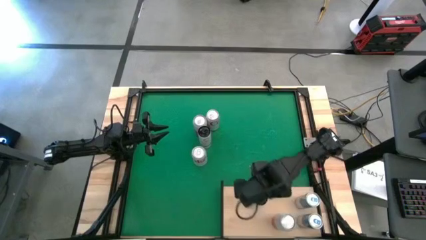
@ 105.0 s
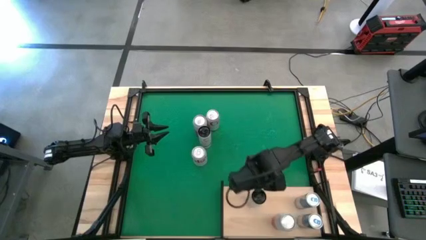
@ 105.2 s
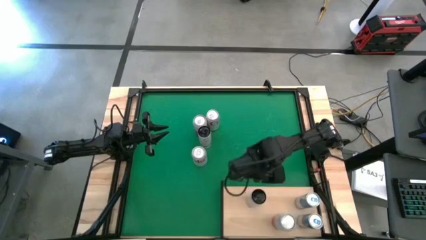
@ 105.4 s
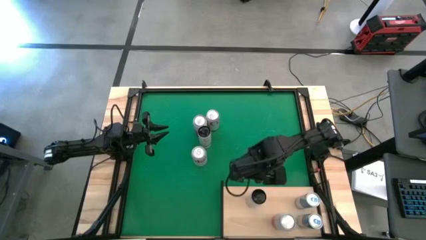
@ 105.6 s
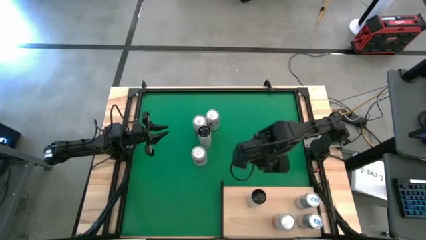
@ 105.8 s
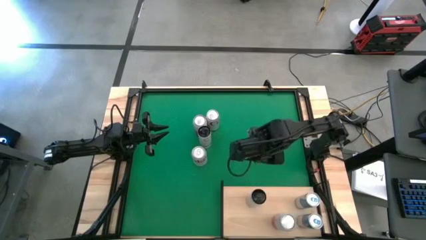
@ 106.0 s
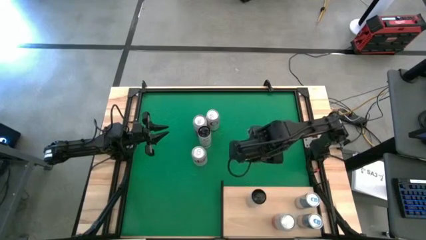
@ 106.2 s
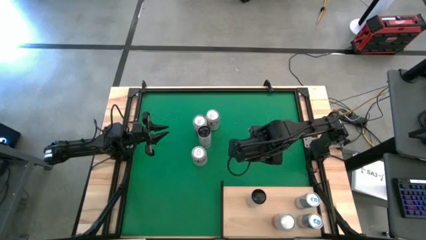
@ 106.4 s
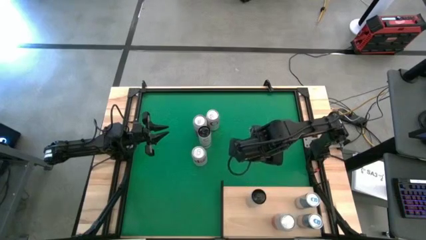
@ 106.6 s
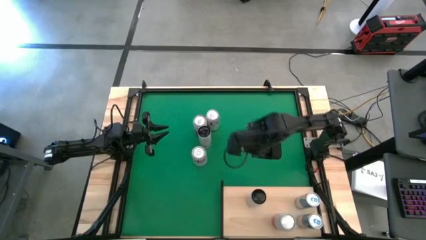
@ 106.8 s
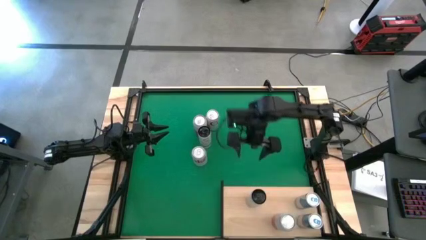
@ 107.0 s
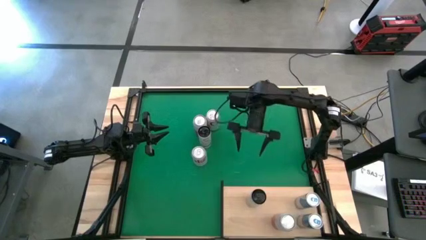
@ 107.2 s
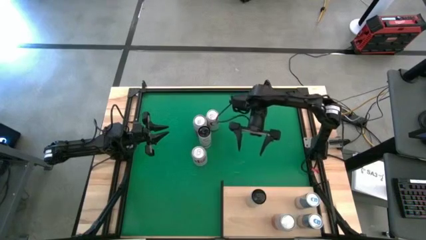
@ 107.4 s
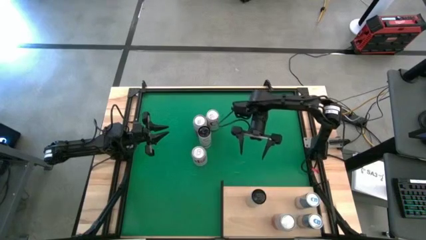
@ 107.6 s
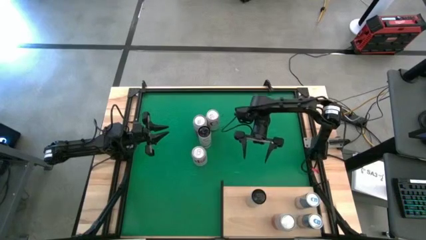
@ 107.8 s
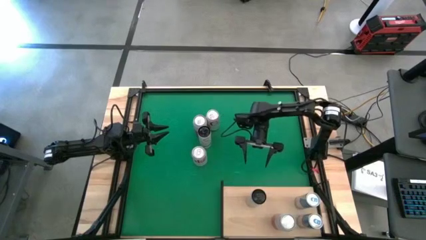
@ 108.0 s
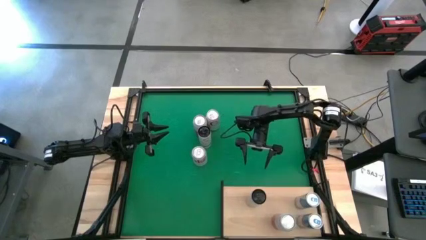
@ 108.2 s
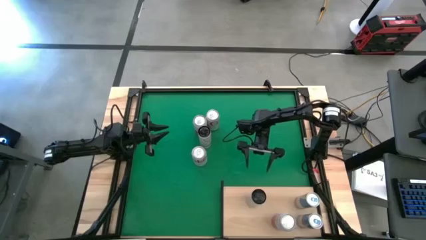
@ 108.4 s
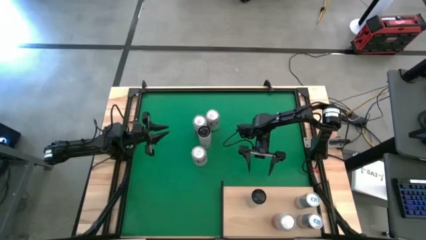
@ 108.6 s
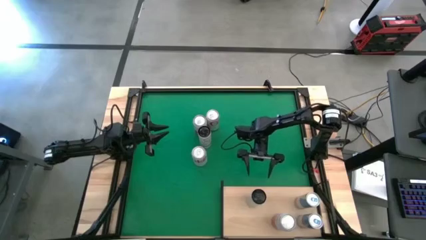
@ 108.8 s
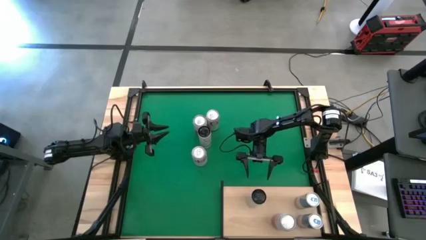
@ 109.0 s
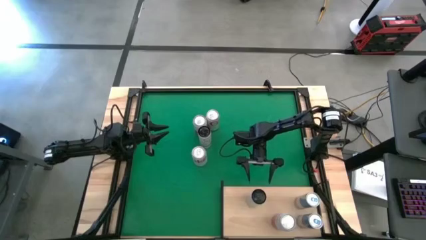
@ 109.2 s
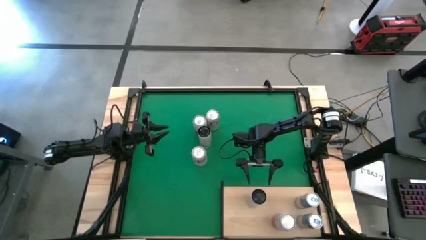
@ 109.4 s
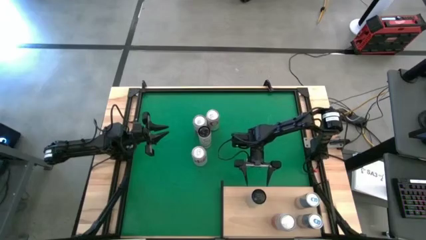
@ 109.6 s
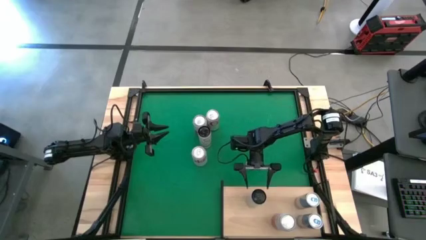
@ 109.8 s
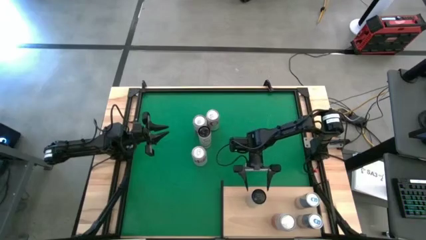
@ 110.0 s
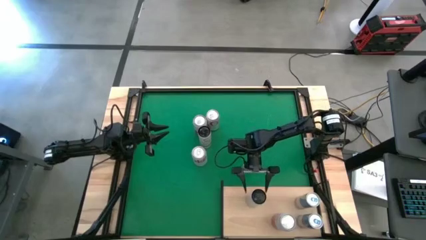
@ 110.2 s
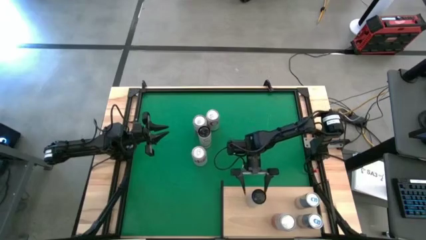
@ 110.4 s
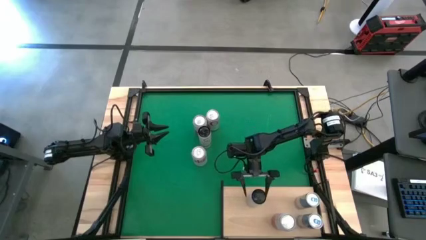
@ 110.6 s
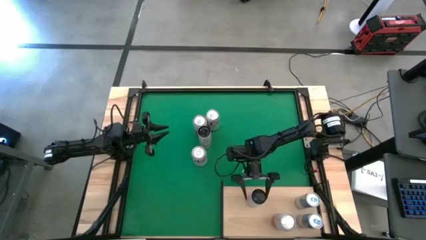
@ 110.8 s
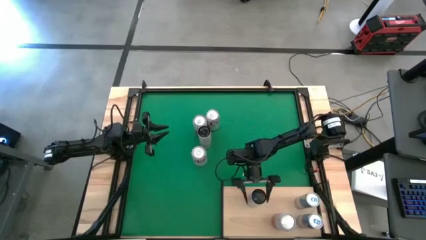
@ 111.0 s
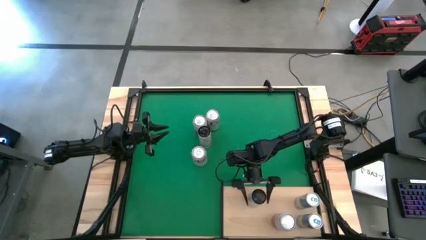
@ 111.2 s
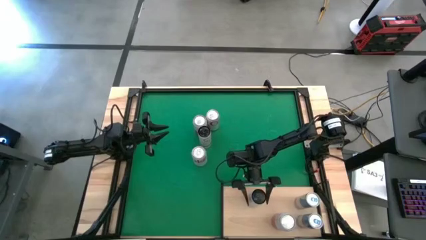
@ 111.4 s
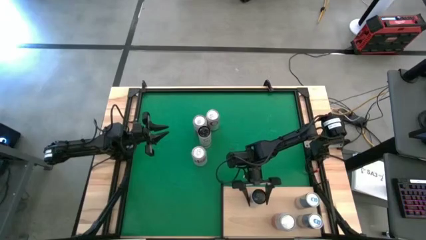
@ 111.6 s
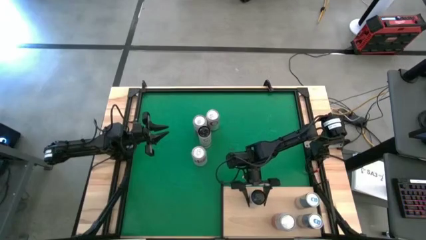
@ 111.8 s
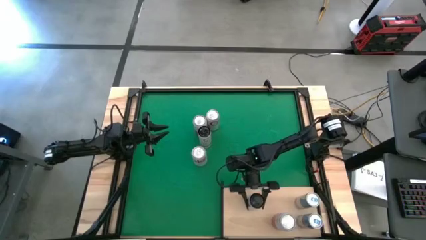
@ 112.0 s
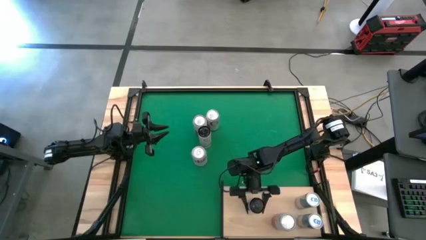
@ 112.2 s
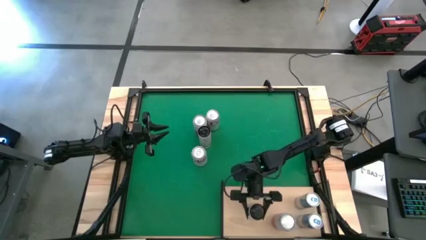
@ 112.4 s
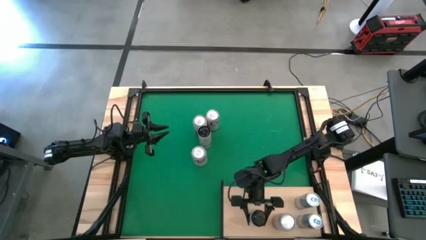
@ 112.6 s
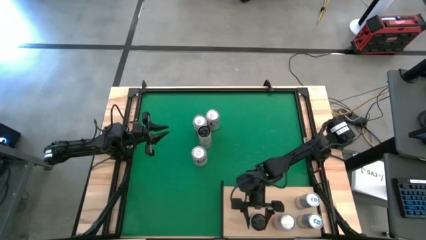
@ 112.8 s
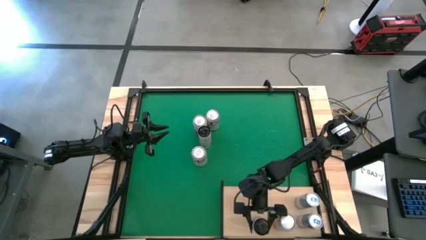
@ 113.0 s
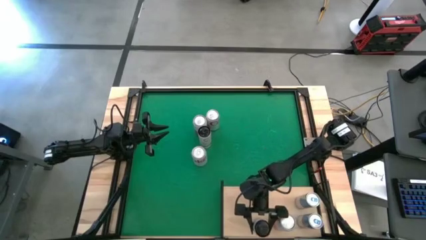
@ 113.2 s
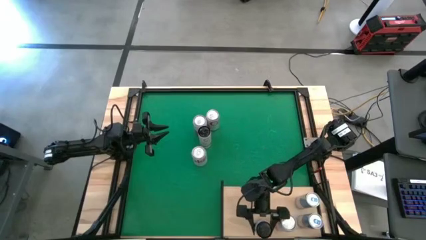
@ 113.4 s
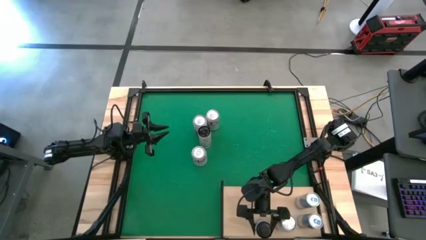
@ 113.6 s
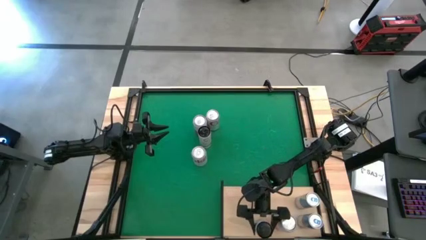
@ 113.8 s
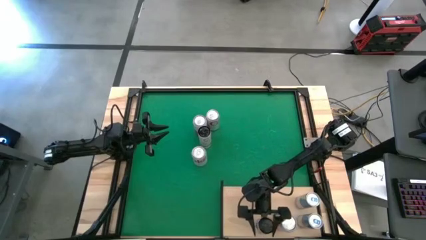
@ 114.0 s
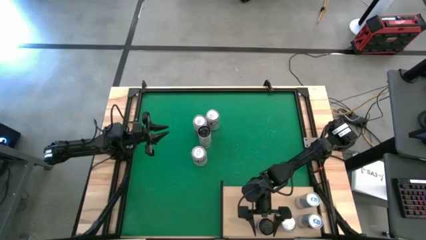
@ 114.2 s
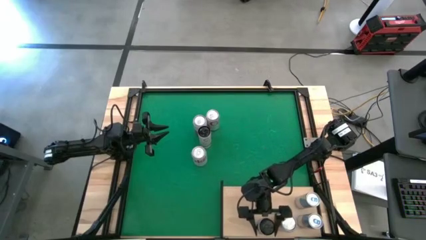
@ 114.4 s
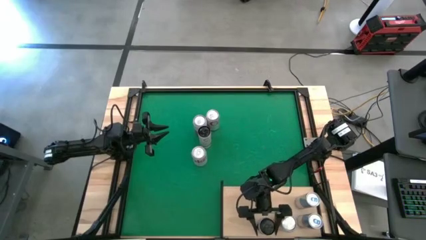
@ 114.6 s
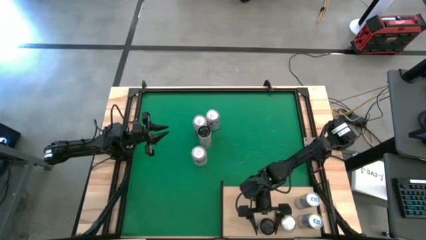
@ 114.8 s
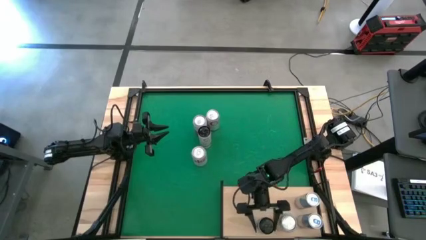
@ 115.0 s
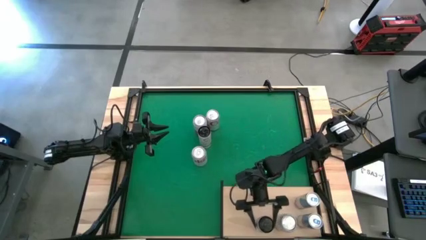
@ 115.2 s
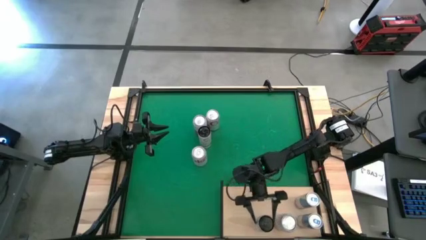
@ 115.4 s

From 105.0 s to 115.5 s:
Task: Place canned beverage on shelf
Put the right white yellow soda can on the shelf

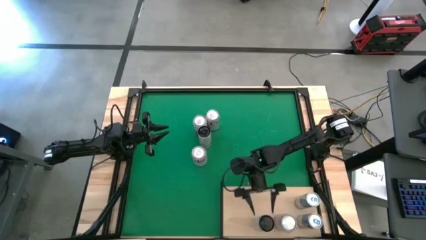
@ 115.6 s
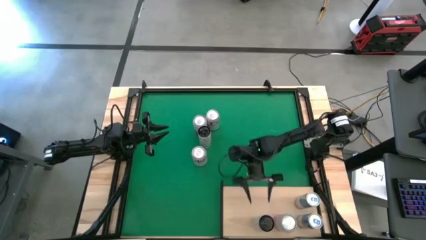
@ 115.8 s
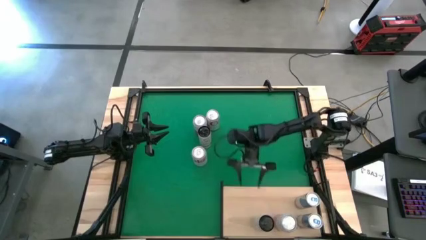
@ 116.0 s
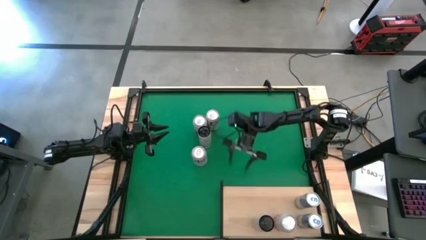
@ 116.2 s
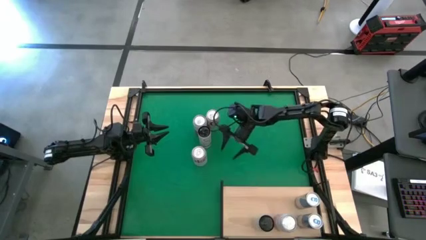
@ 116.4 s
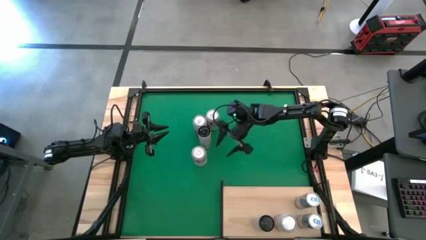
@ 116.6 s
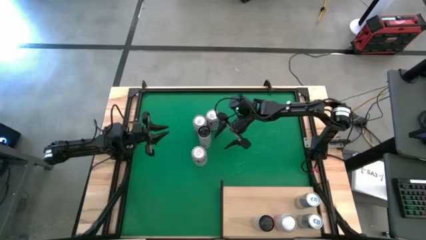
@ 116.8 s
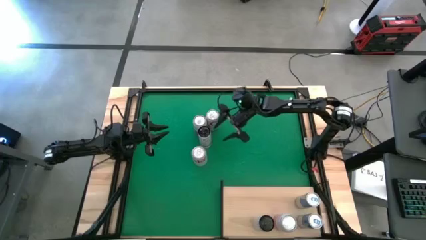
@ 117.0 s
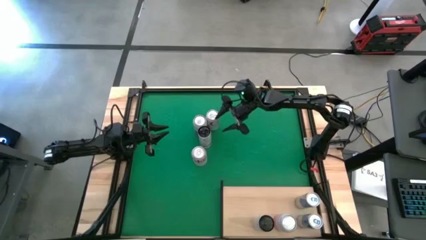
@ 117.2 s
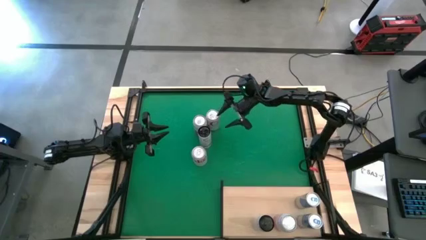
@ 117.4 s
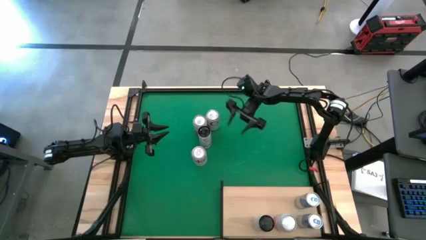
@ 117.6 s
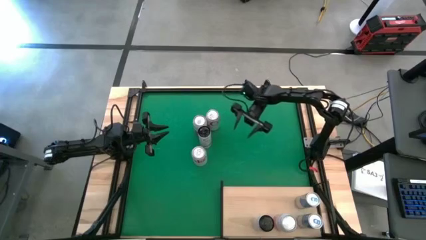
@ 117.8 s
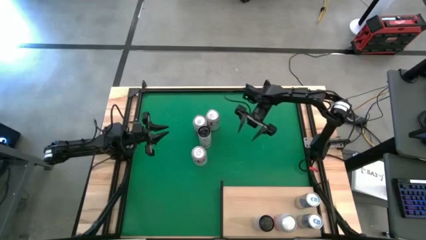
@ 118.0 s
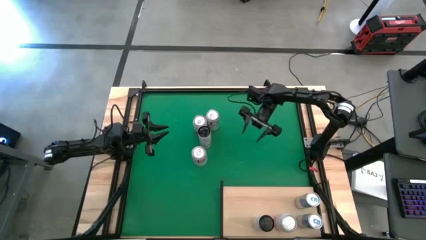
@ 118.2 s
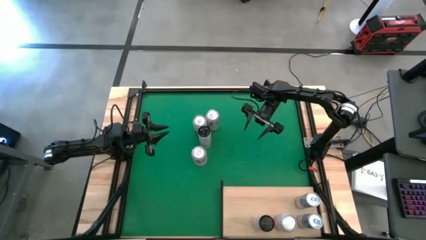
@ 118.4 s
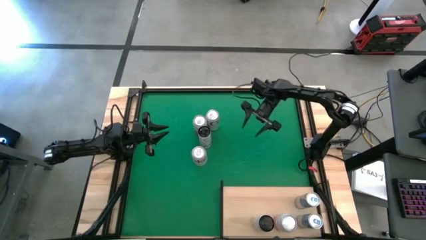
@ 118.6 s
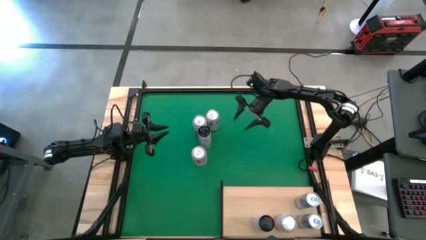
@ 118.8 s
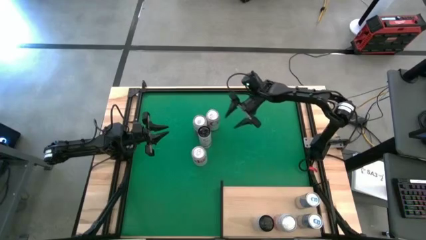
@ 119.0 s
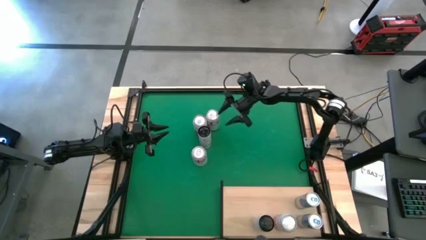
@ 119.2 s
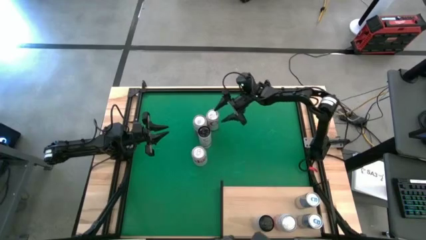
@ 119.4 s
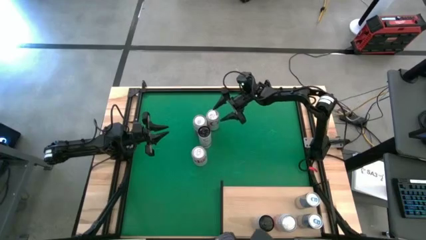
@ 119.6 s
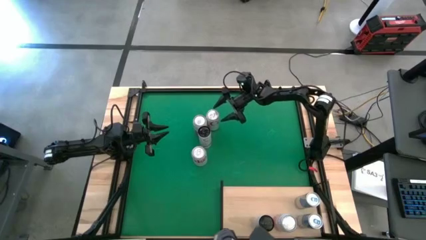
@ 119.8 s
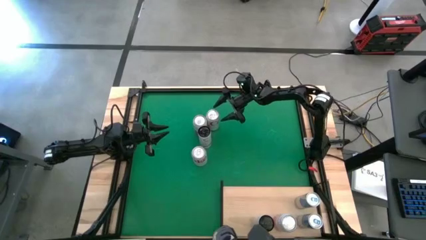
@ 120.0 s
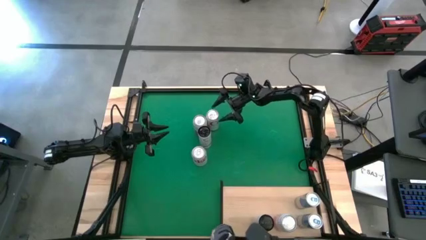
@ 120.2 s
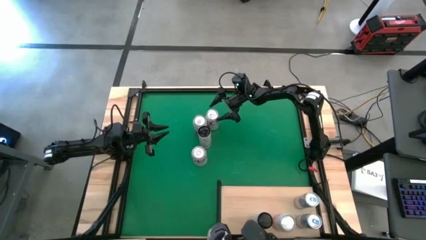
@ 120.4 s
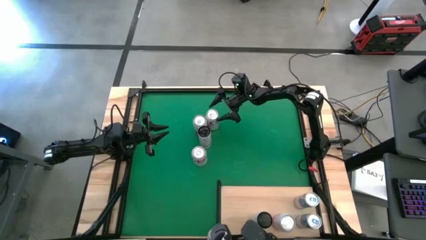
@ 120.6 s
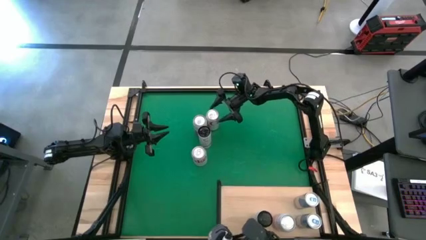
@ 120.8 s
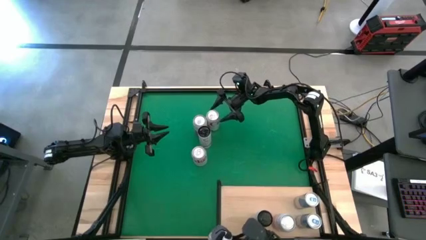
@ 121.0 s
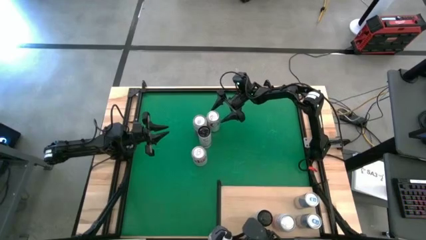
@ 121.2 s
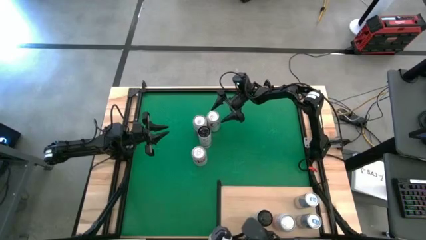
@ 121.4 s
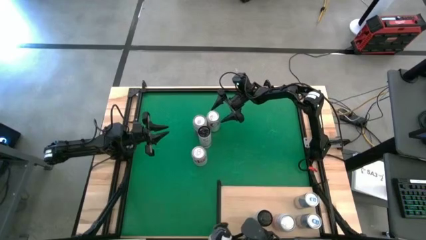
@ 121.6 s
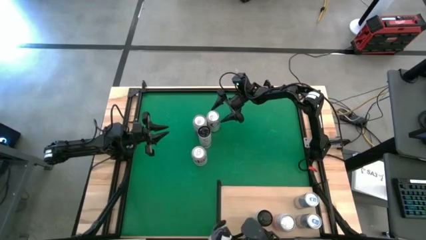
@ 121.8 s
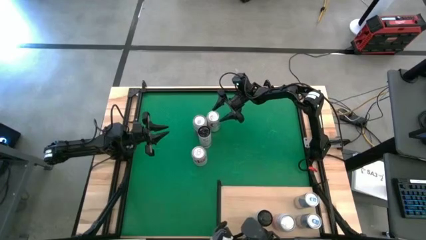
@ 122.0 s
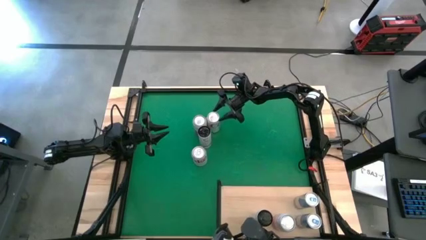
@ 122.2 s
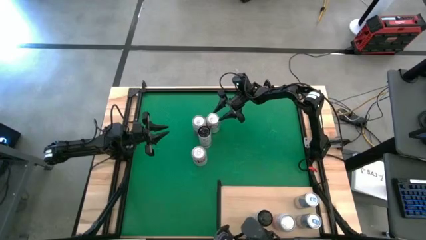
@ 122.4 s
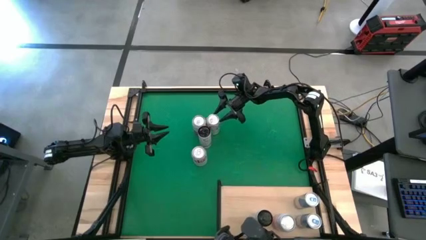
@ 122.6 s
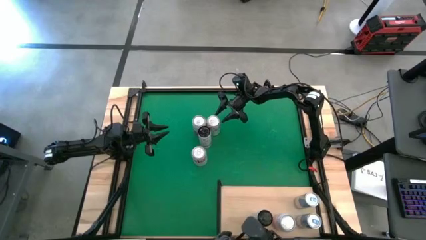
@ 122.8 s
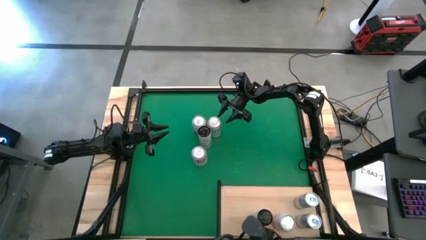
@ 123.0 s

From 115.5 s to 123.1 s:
Put the right red silver soda can on the shelf
